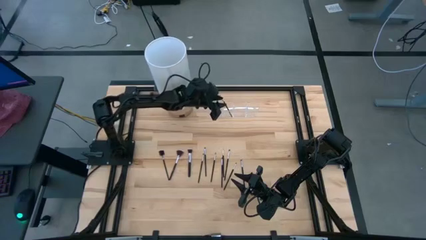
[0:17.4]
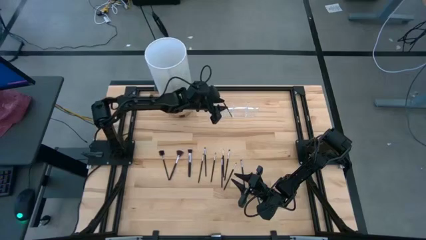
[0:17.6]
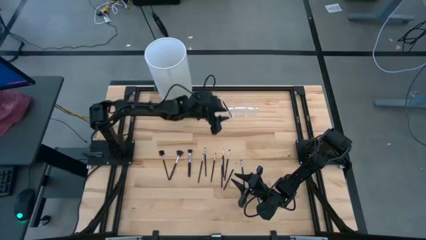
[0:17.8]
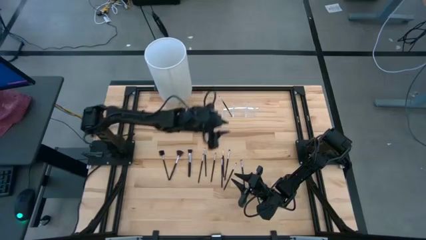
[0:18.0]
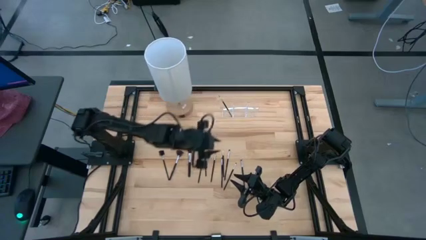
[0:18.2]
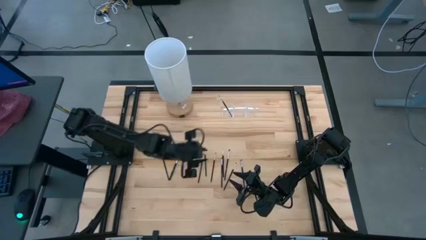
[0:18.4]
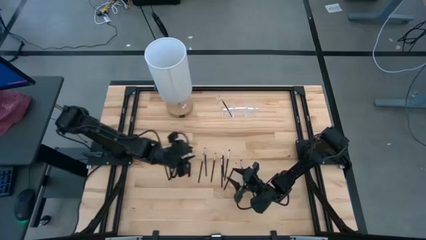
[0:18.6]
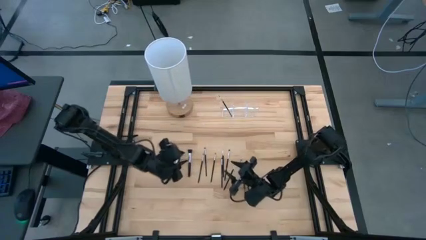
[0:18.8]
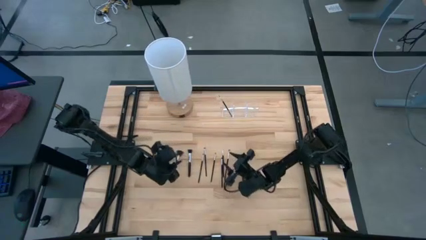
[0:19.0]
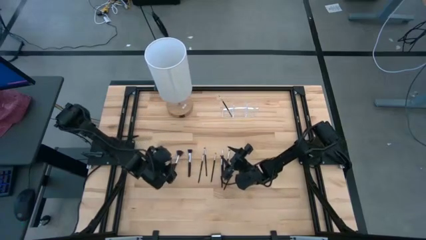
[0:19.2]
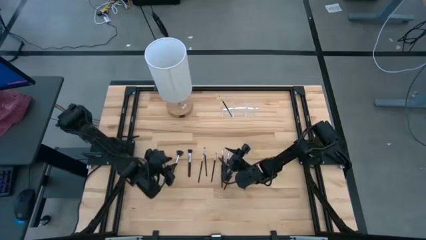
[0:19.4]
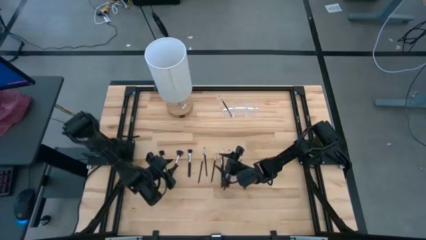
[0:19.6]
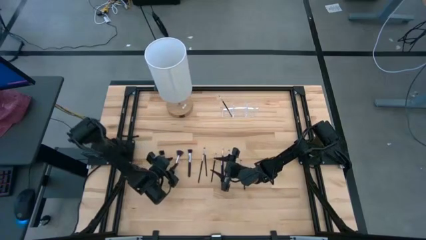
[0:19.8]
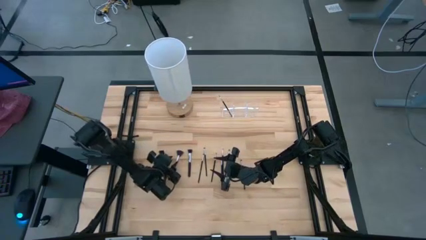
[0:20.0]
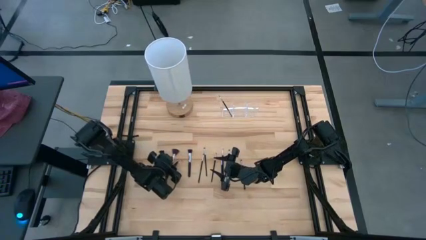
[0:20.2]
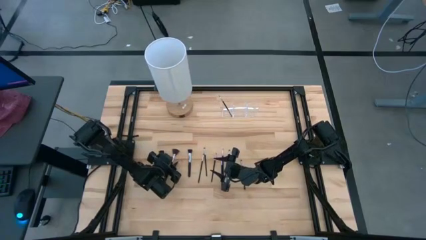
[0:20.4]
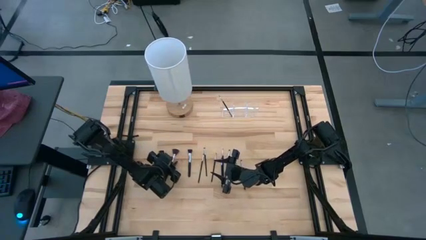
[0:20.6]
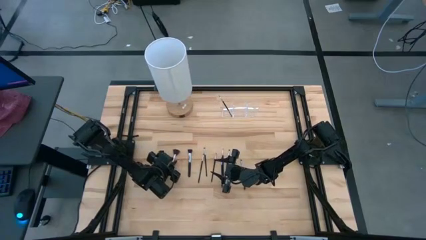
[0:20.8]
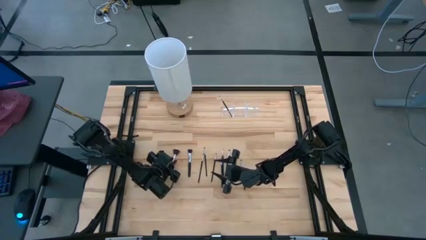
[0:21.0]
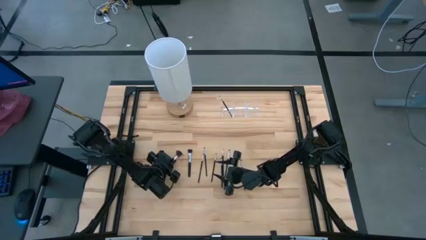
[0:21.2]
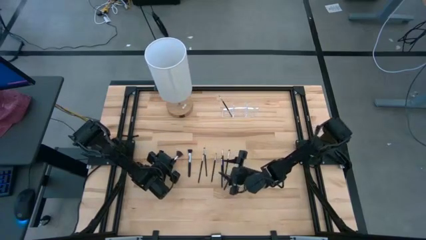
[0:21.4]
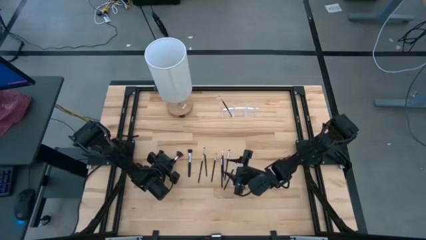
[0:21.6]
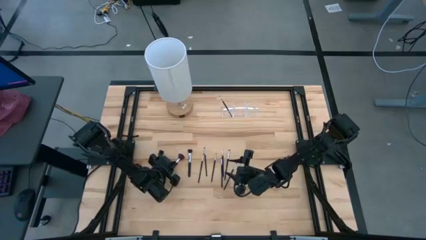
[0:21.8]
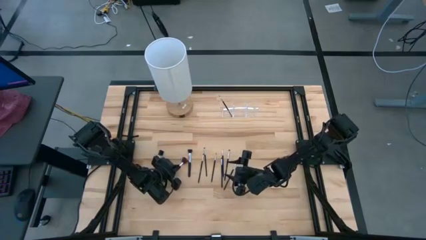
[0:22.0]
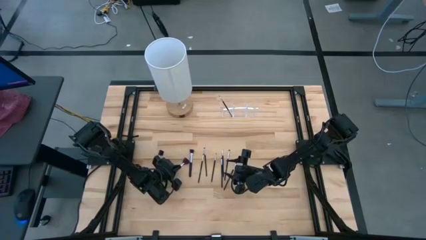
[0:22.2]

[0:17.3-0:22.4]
Task: Sort items
Put the highlighter brush into the transparent organizer

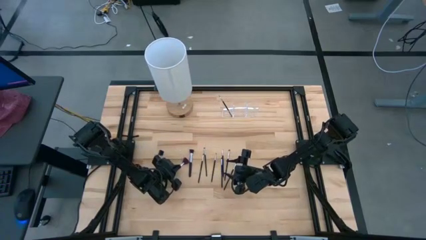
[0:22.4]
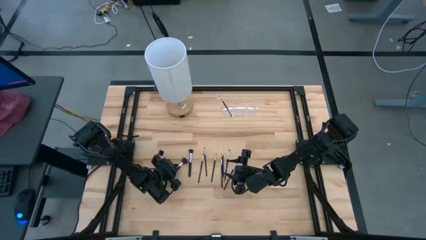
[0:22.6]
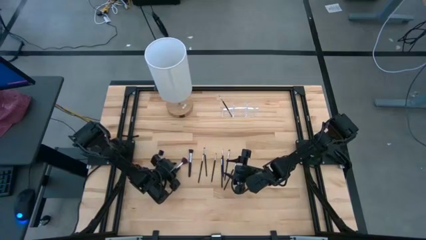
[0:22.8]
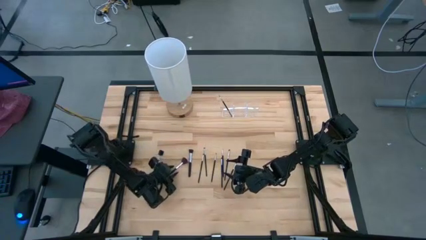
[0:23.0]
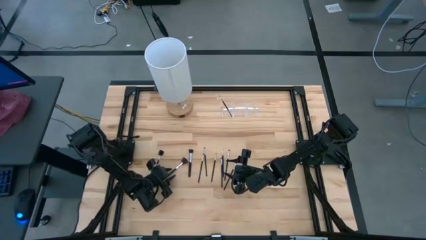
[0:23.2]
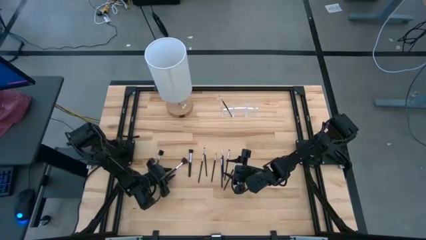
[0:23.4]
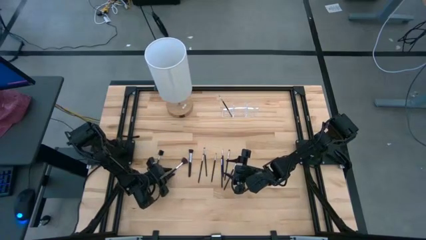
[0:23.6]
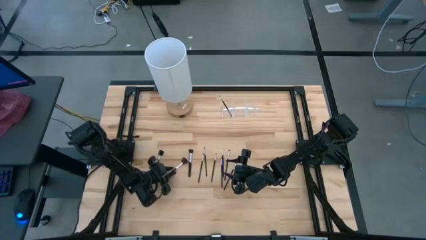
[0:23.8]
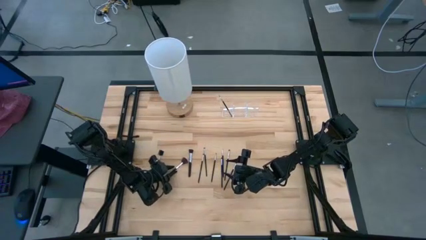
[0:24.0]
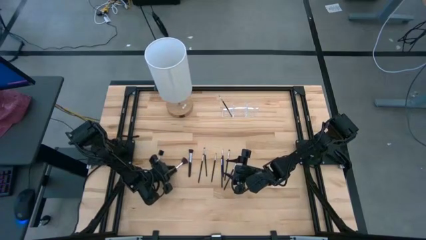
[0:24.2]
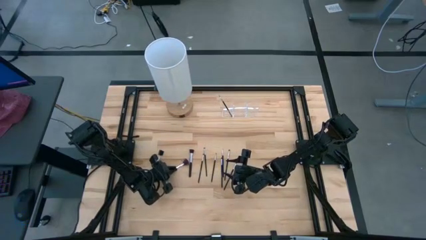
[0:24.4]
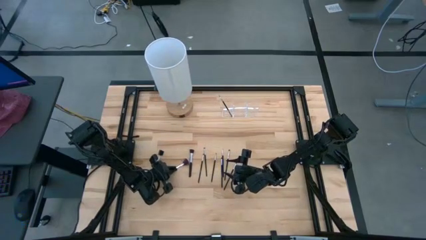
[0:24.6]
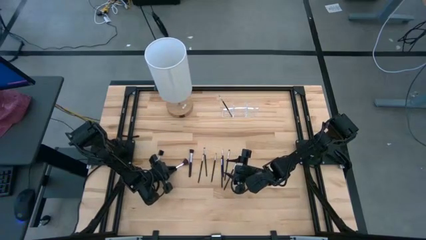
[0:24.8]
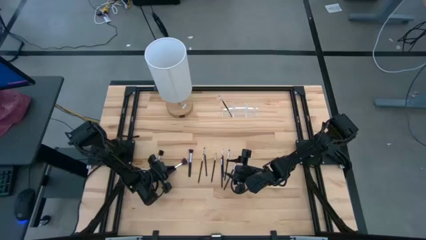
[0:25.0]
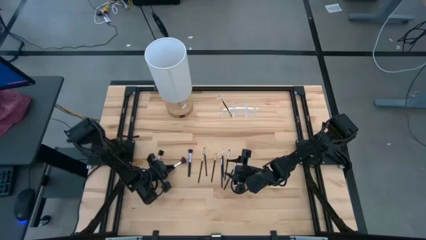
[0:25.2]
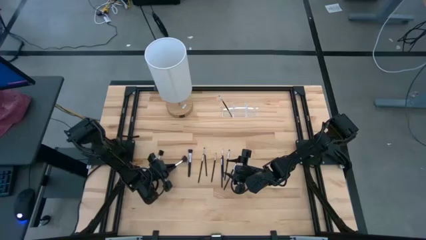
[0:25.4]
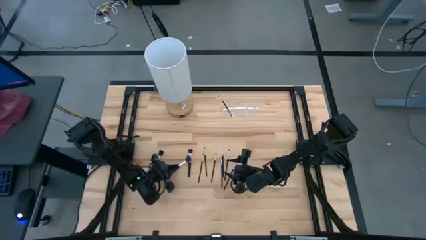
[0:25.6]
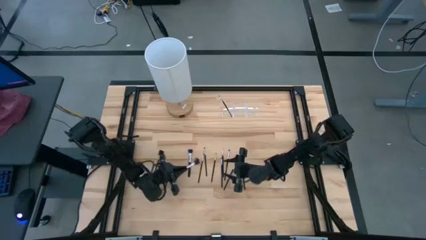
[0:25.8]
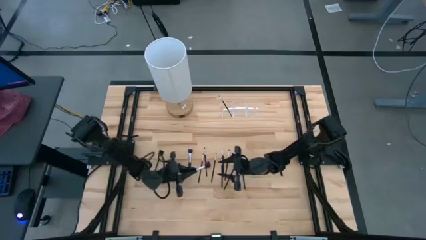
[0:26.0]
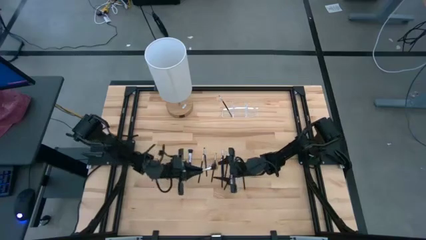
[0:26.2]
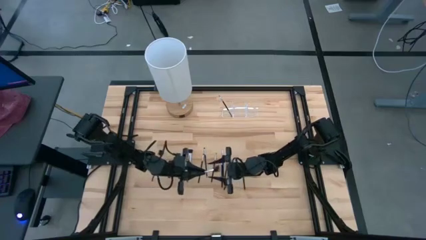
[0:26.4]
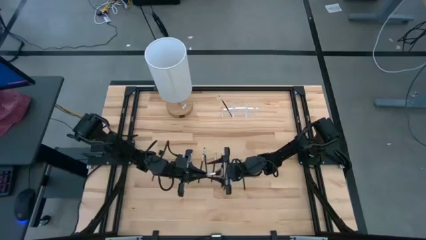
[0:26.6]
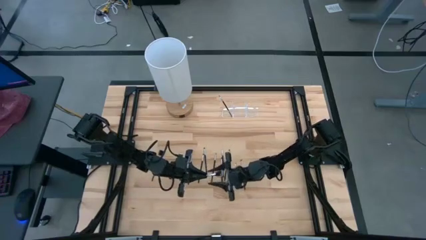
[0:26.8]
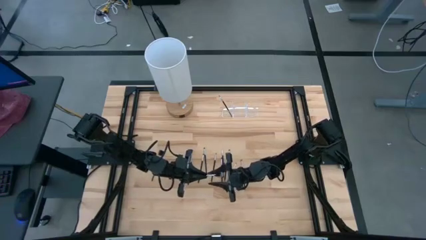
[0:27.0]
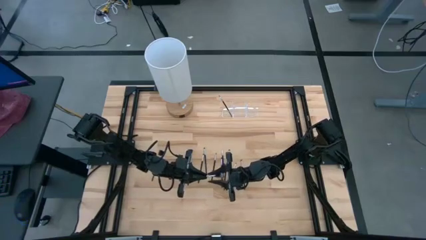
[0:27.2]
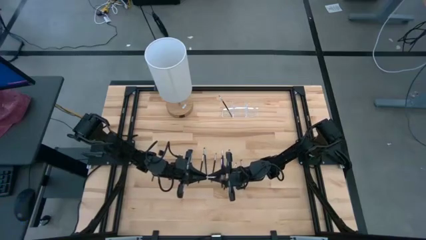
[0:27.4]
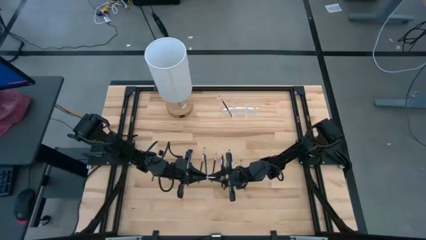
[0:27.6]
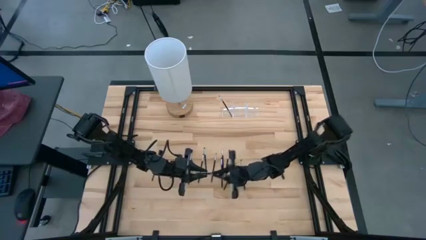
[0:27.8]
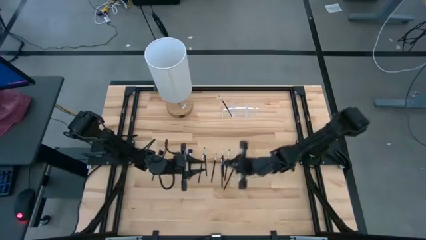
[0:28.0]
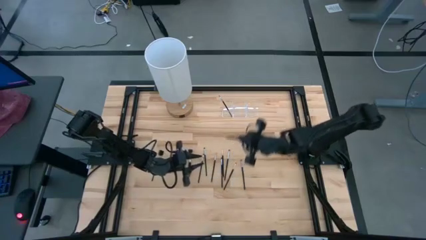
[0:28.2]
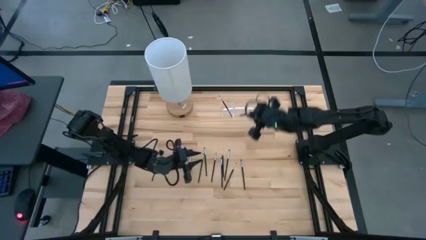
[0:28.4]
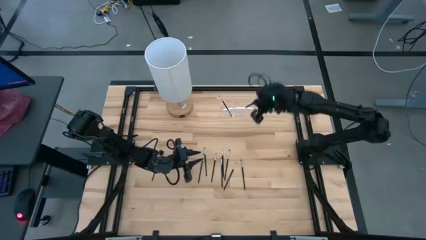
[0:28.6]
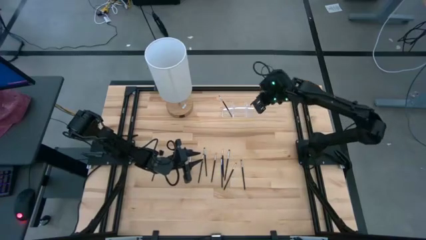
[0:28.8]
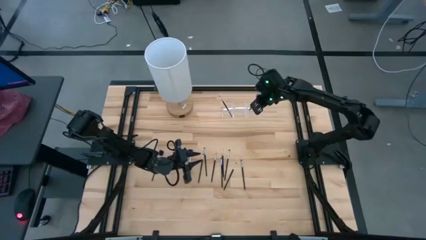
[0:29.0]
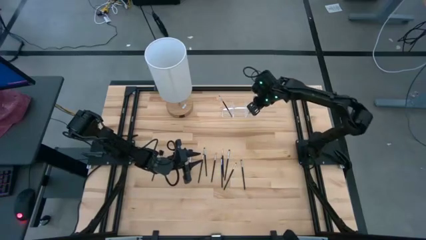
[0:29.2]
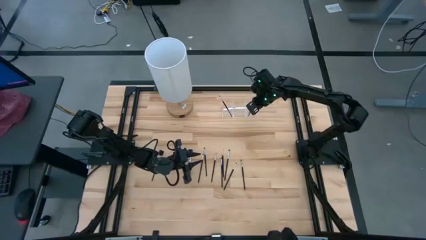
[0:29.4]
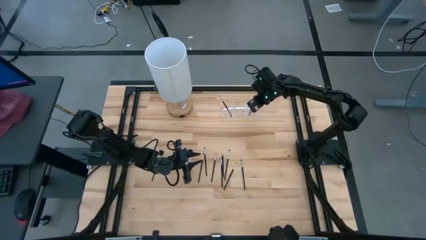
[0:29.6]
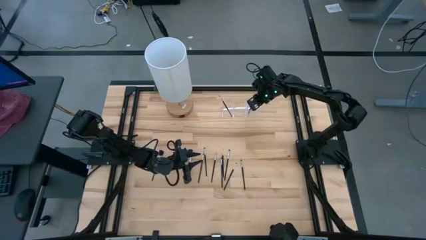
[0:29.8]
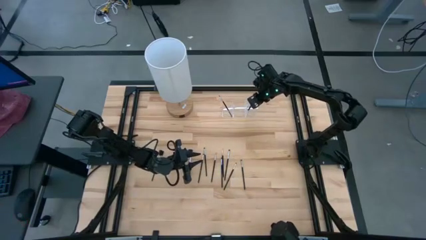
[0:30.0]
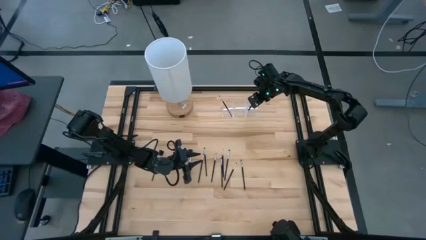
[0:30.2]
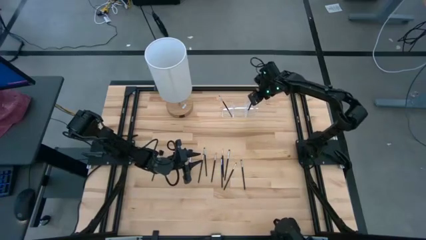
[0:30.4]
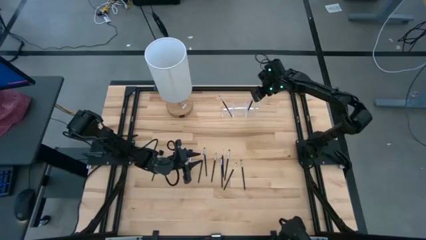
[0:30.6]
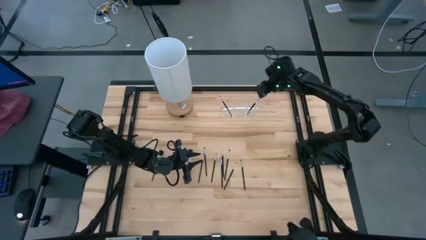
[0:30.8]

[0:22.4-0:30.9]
Put the highlighter brush into the transparent organizer

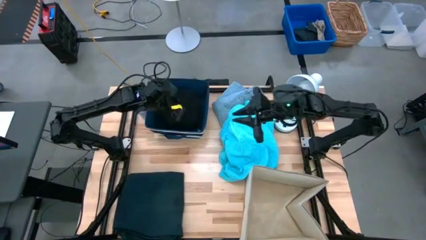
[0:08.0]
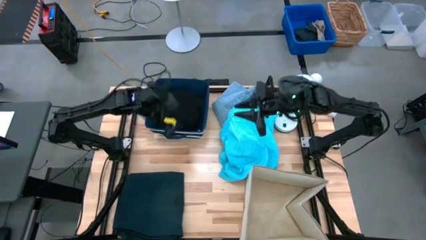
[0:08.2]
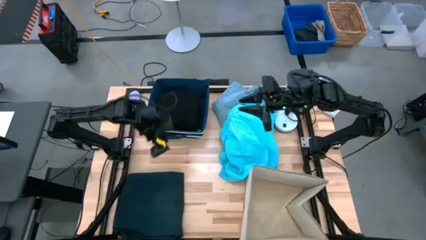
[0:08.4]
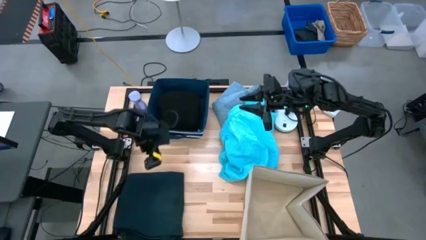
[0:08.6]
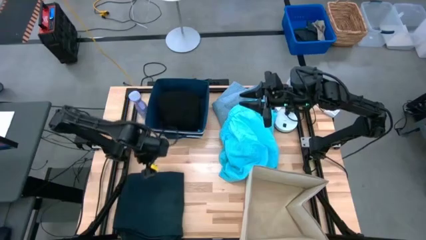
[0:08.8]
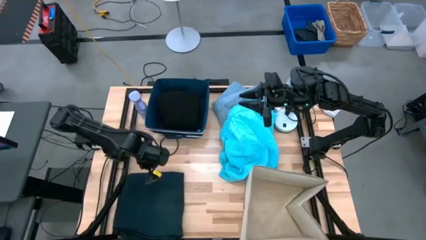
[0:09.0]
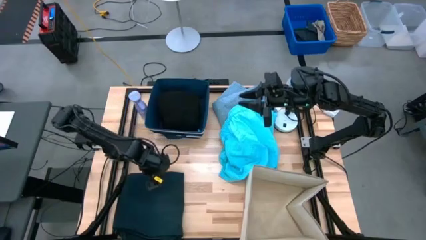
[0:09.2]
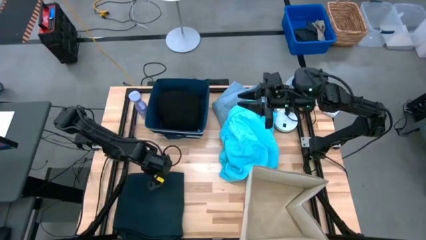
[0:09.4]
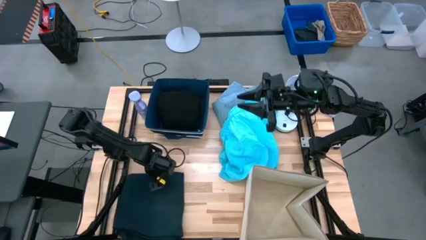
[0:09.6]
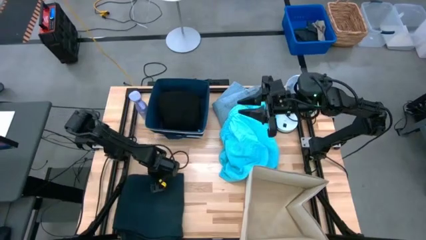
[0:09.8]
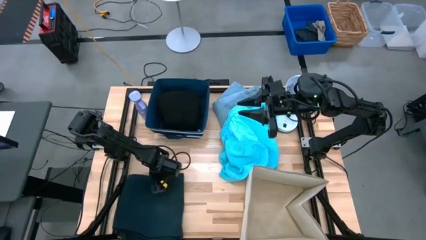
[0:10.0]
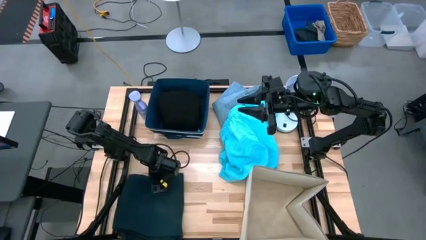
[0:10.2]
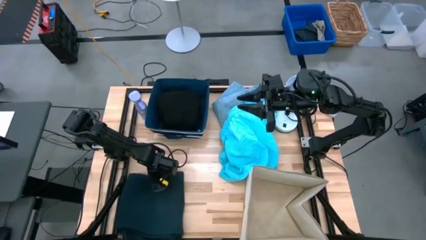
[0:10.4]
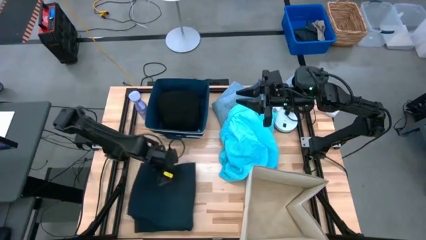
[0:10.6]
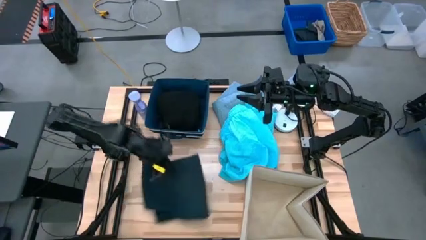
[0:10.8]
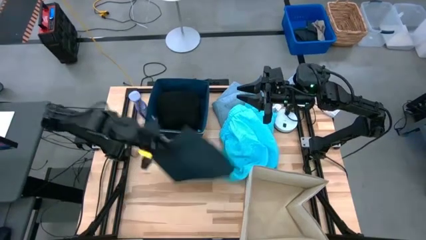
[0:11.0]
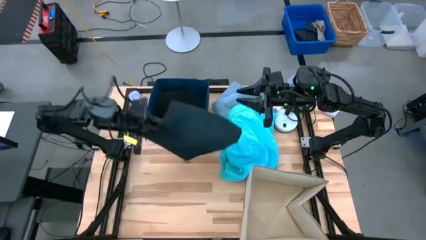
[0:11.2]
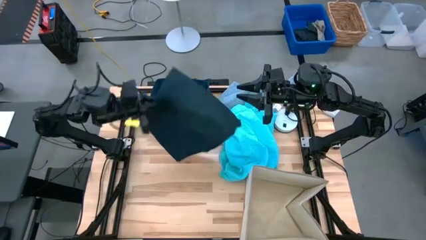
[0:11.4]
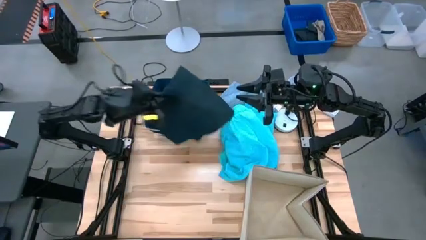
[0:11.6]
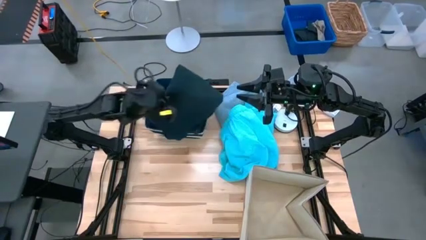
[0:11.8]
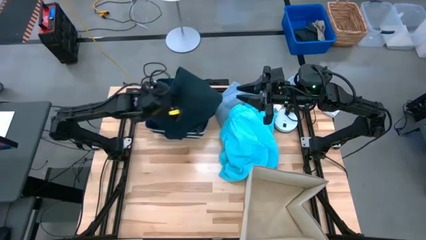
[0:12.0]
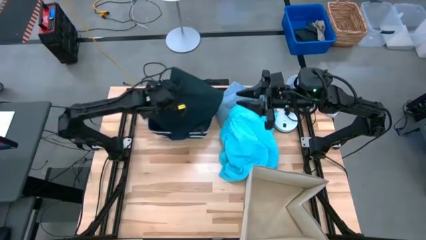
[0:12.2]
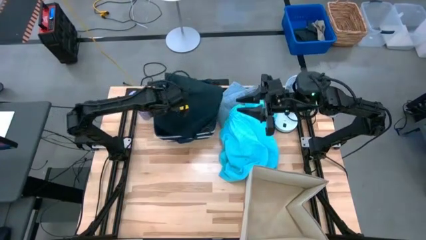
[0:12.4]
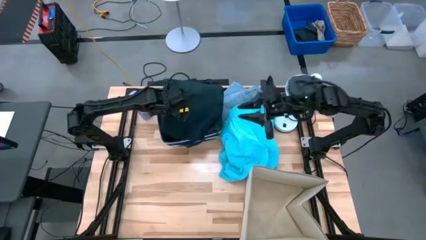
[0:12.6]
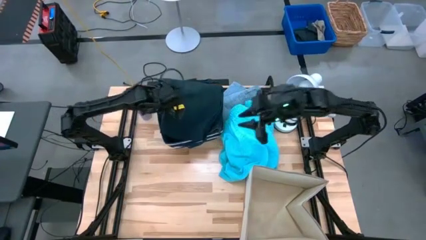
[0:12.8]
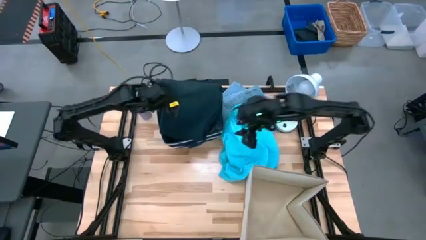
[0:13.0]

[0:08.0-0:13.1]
Task: Sort clothes
Put the black pants into the blue laundry organizer
